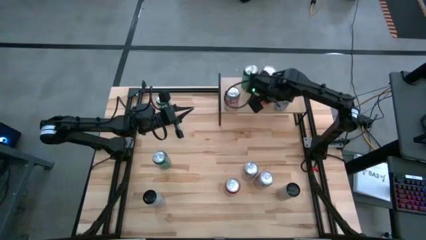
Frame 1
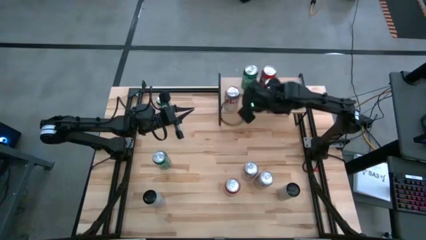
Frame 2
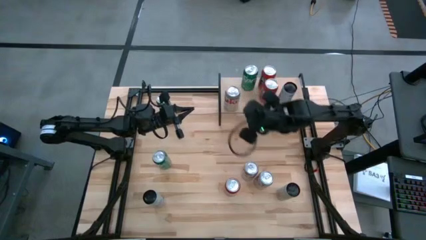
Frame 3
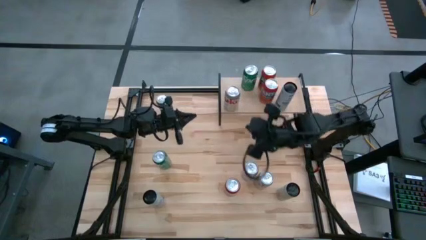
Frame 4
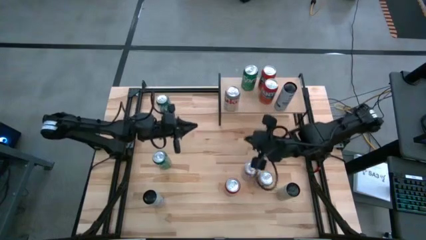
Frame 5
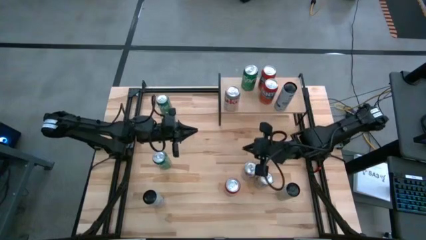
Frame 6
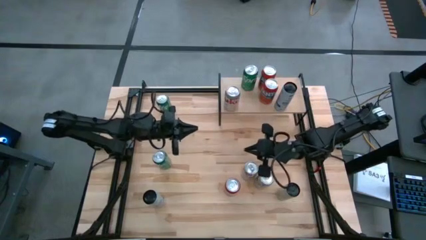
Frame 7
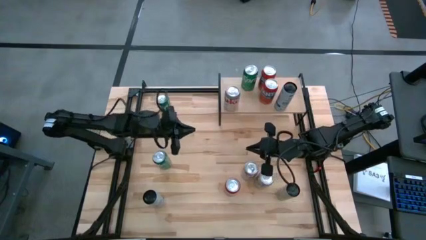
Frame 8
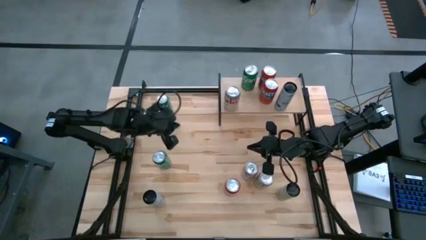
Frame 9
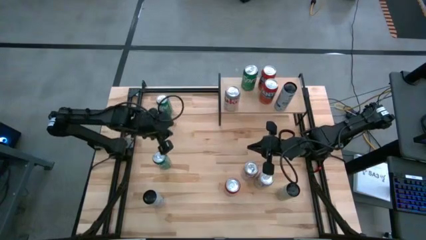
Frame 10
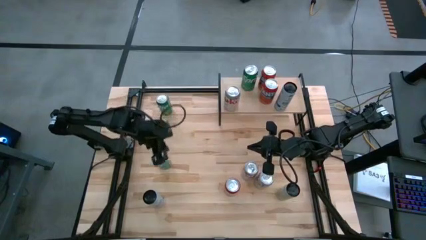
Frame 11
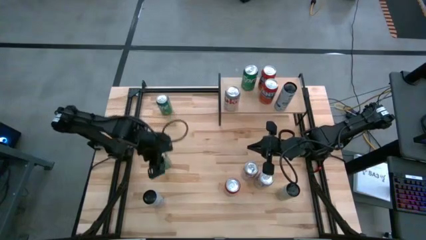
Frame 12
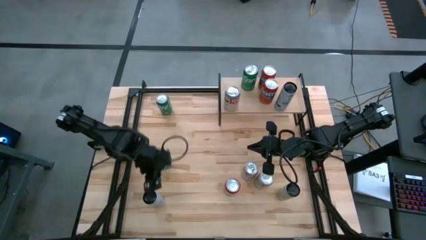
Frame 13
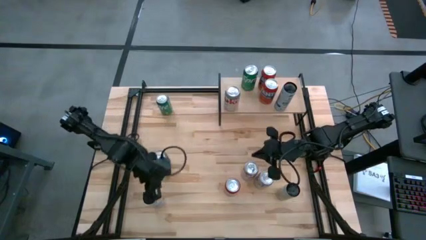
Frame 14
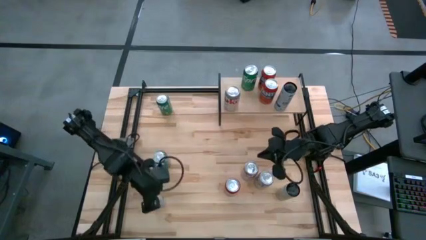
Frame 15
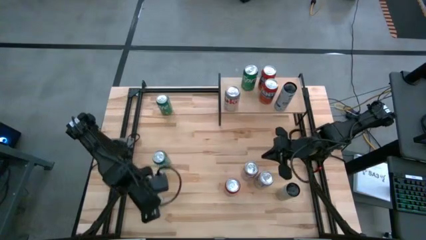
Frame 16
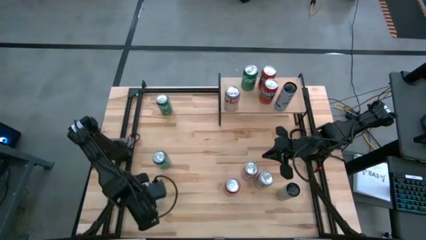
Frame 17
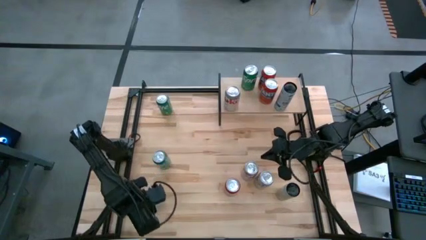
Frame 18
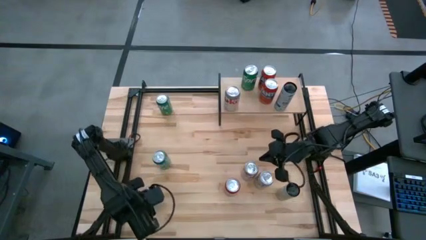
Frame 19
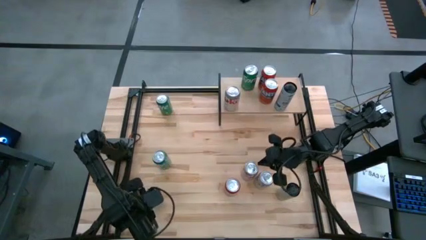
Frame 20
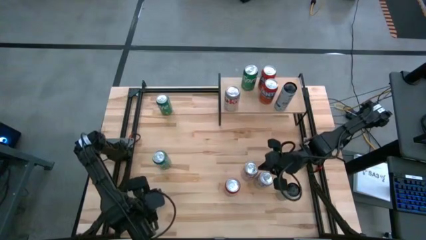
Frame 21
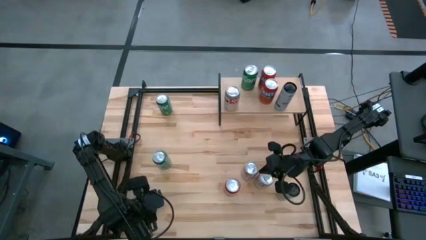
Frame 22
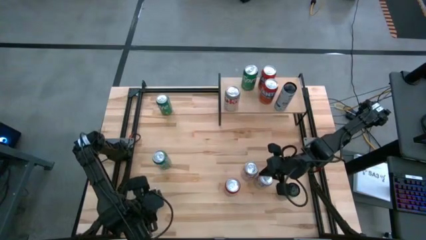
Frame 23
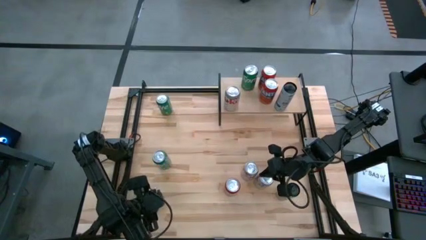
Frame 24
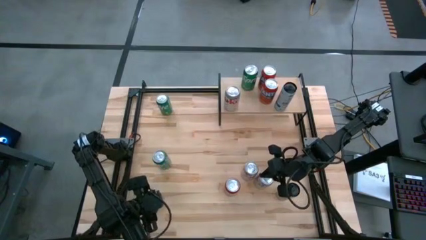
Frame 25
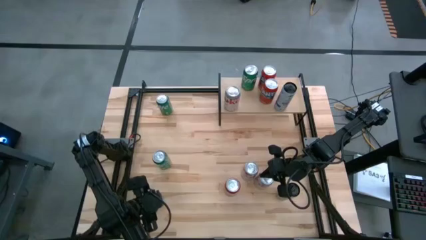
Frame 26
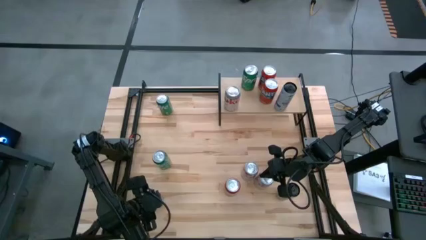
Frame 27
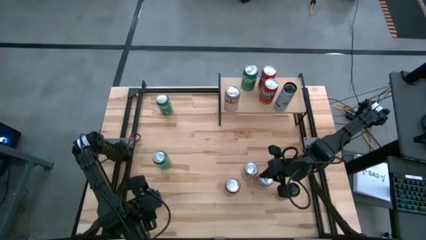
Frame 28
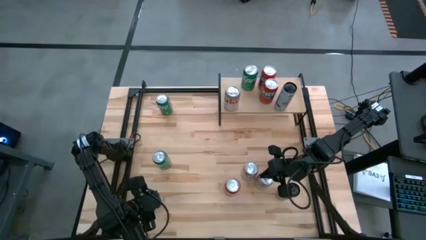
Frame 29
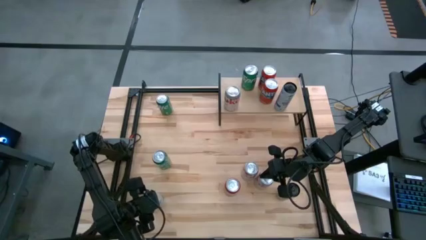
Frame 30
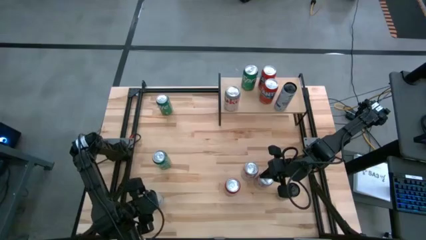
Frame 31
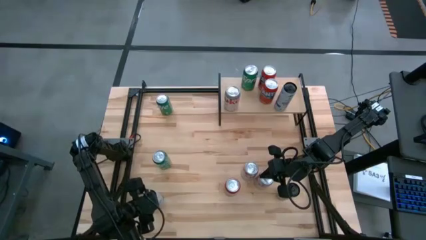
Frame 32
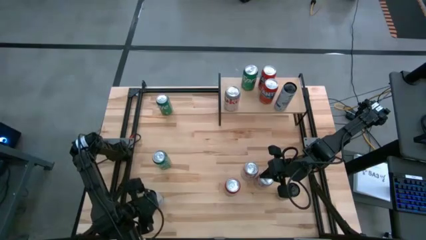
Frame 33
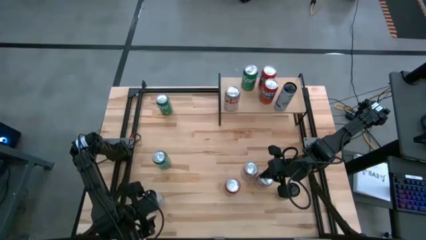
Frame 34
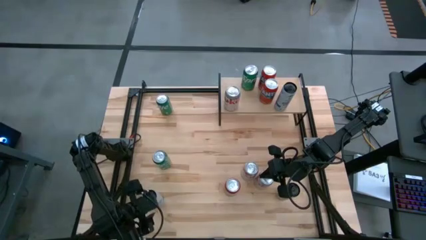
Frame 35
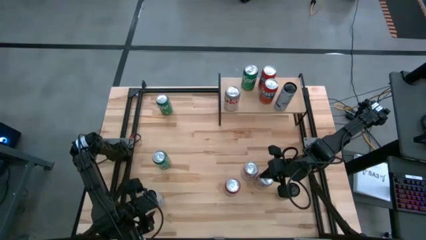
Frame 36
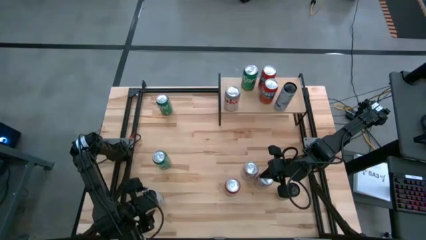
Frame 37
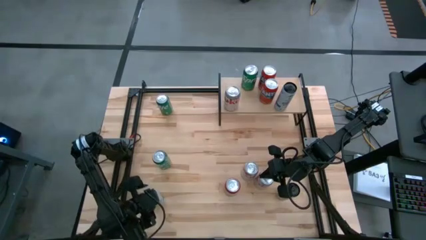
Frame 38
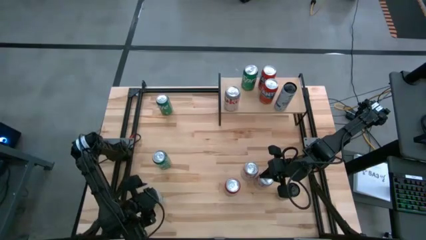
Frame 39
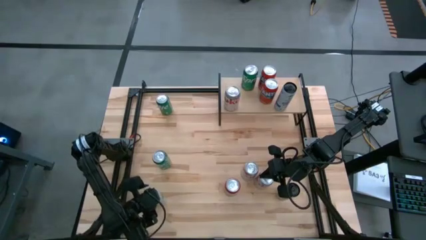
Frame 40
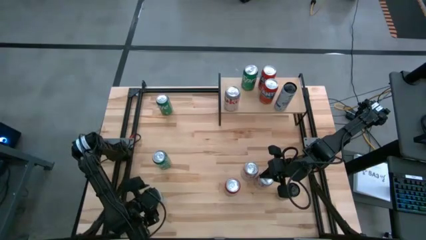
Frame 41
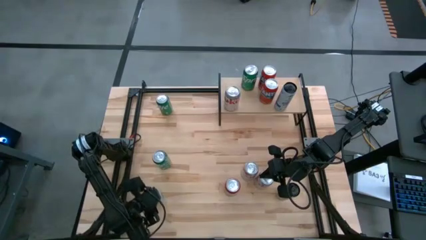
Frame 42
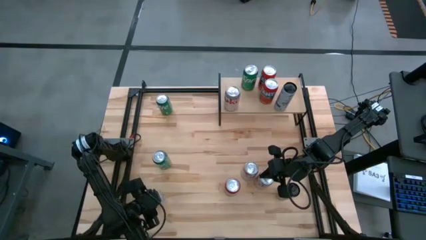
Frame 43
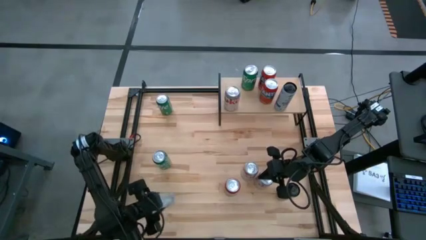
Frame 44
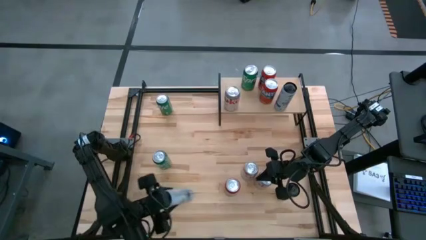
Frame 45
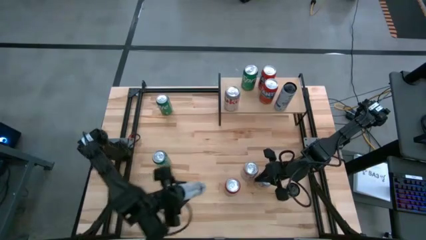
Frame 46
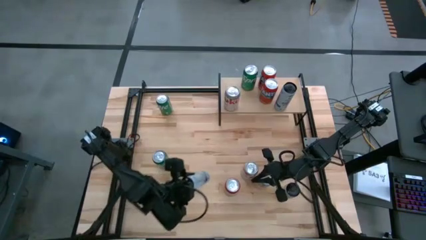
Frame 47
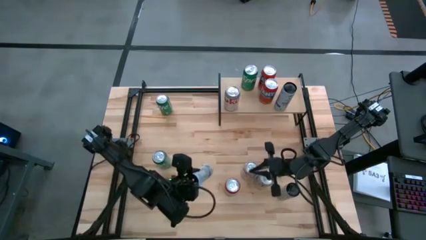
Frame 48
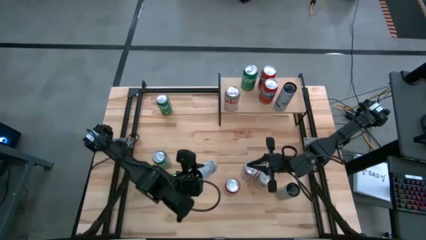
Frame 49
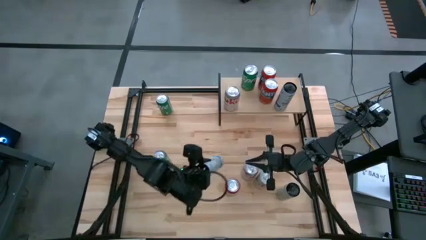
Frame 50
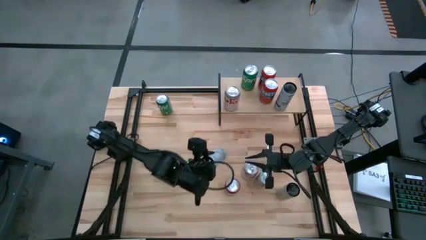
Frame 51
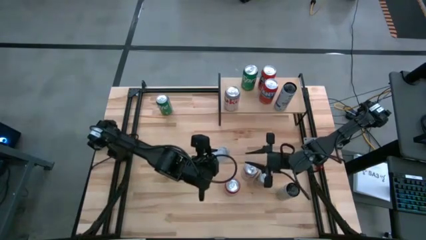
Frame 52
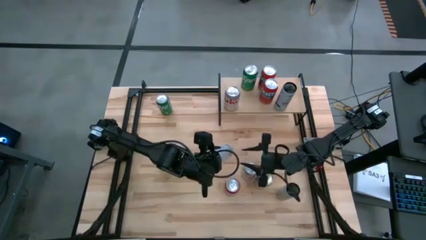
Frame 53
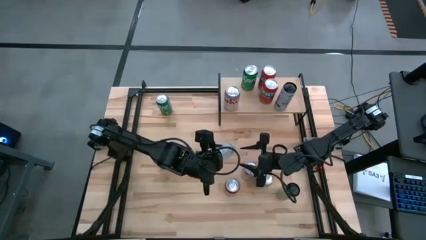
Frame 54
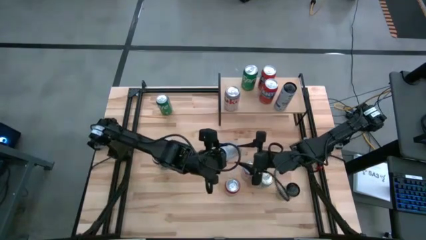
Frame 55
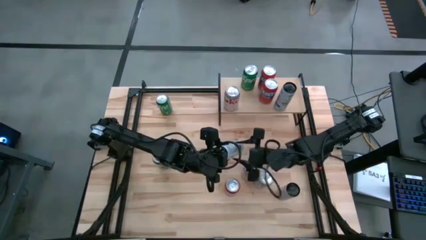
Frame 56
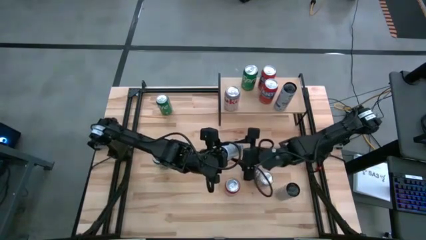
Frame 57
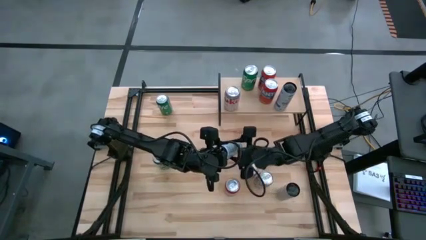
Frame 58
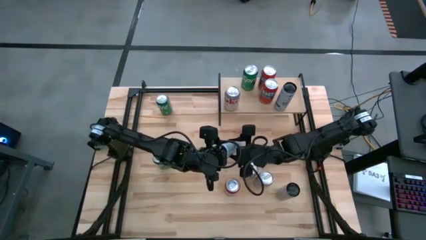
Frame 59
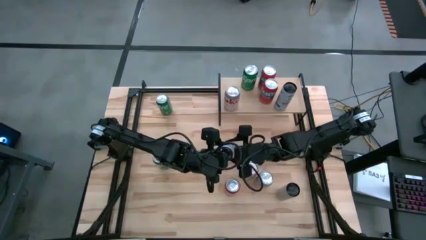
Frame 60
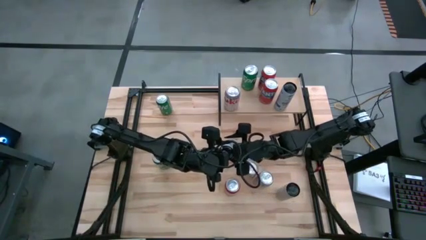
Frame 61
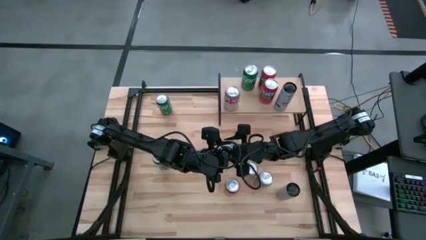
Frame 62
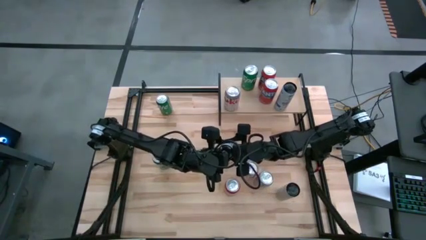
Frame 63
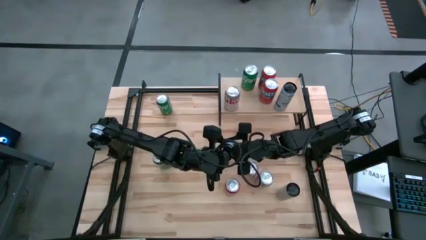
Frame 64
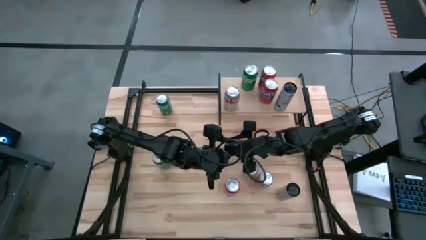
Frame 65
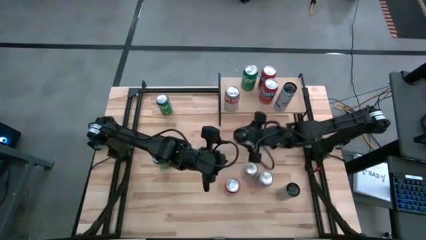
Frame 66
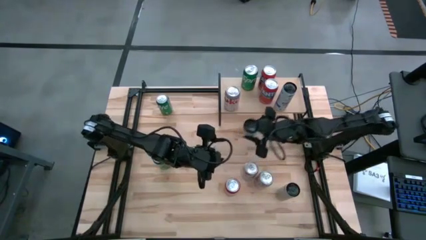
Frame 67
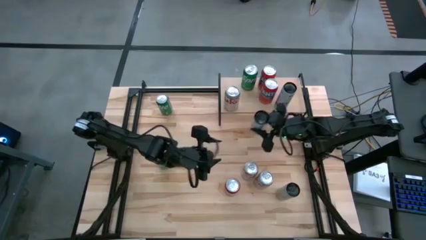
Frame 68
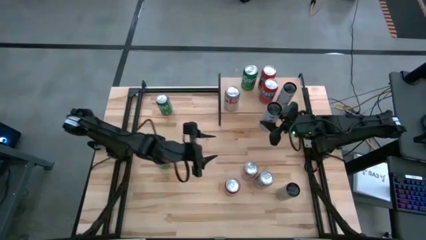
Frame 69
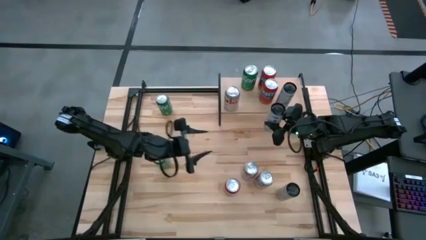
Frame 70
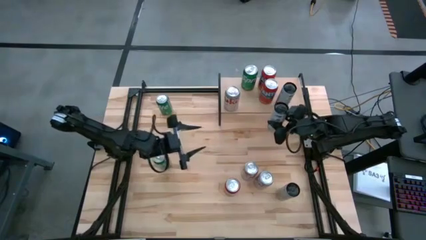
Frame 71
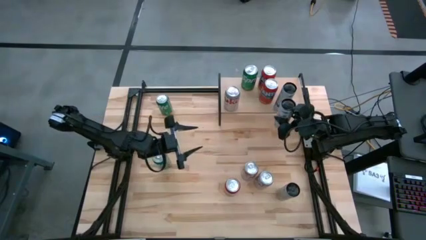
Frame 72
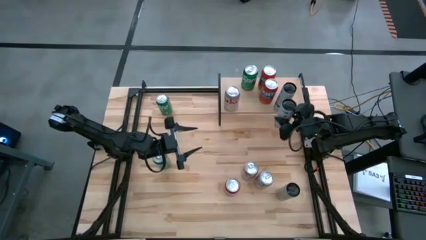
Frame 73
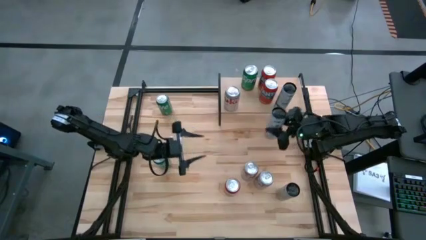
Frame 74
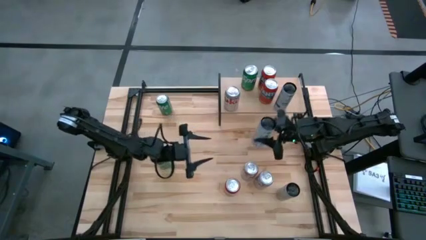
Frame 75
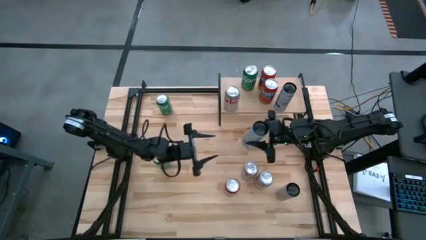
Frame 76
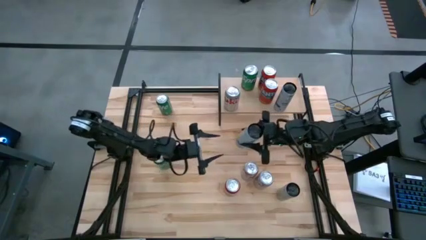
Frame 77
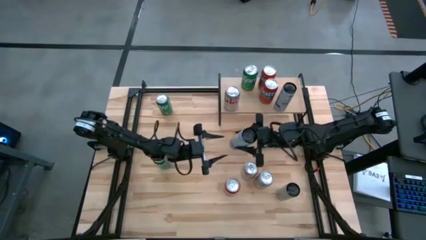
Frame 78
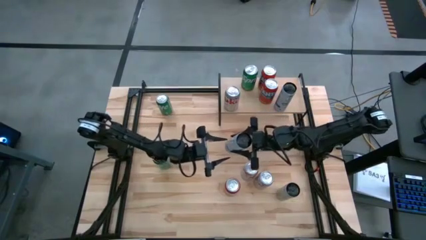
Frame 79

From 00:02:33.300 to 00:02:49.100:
Task: Place canned beverage on shelf
Put the left white soda can on the shelf aligned in front of the other white soda can
